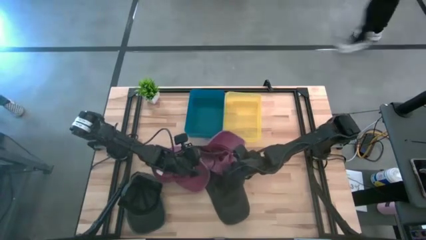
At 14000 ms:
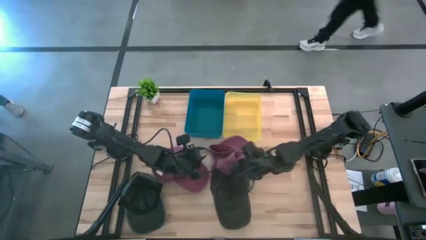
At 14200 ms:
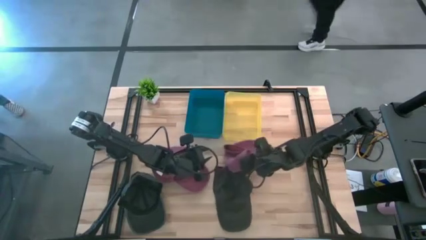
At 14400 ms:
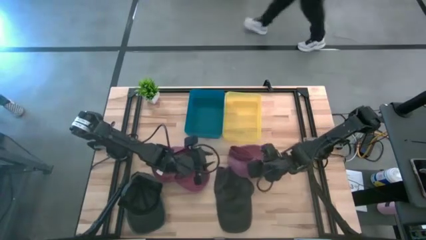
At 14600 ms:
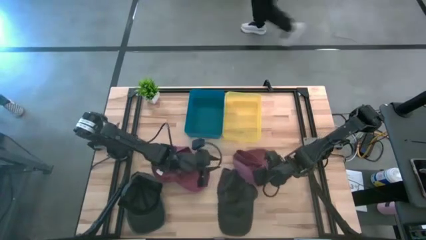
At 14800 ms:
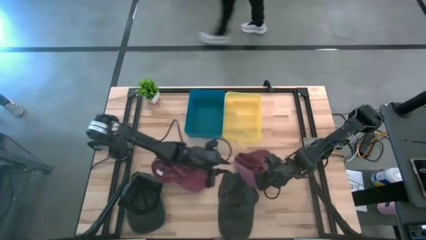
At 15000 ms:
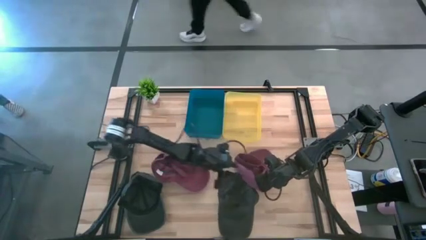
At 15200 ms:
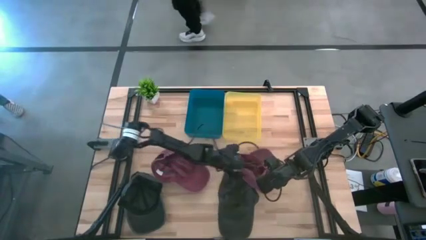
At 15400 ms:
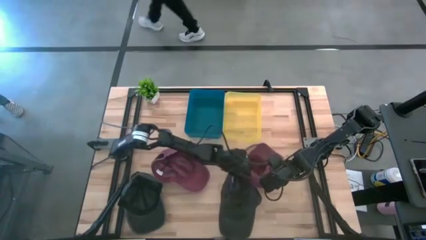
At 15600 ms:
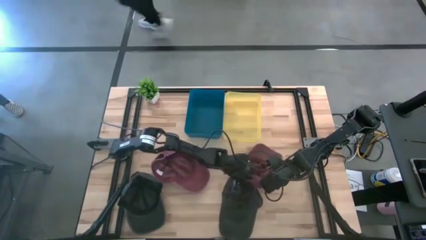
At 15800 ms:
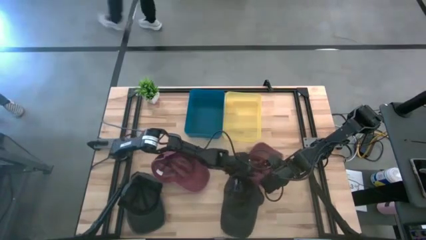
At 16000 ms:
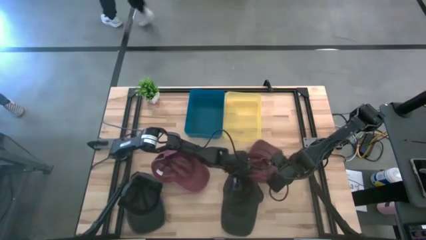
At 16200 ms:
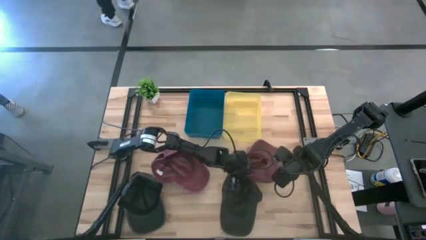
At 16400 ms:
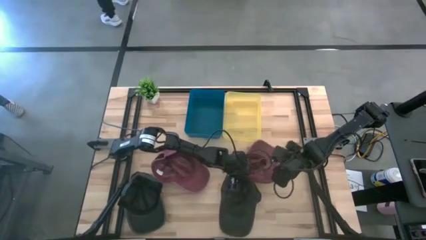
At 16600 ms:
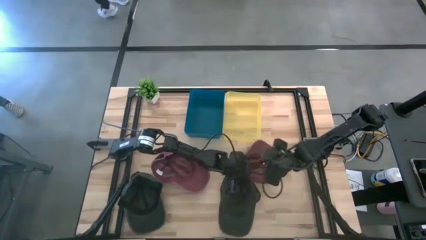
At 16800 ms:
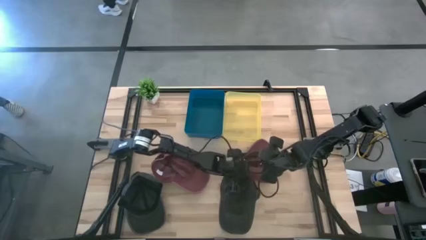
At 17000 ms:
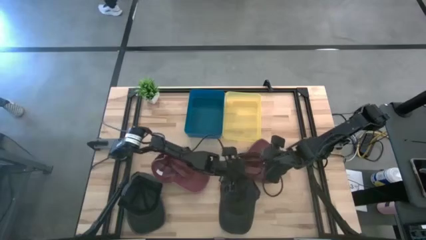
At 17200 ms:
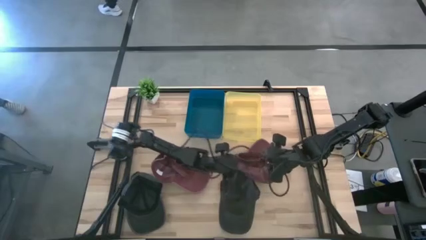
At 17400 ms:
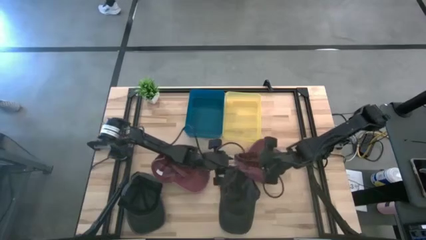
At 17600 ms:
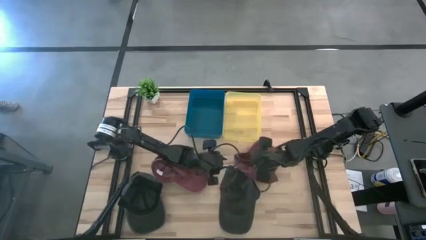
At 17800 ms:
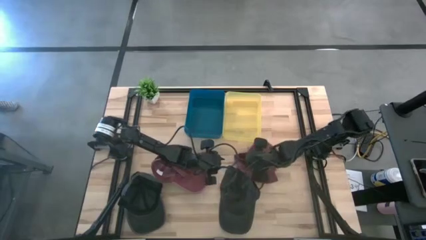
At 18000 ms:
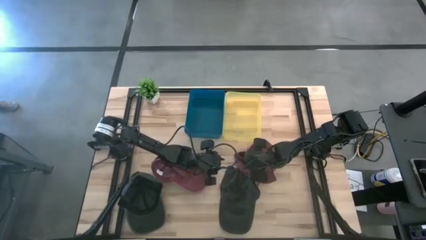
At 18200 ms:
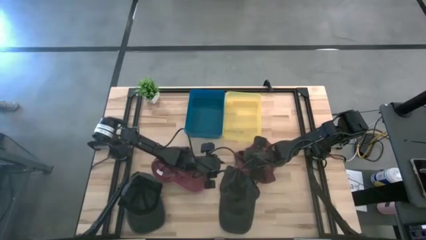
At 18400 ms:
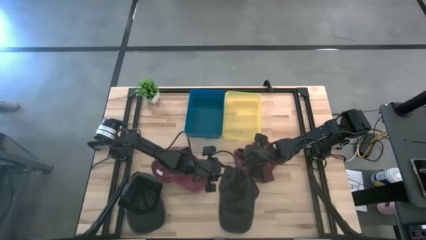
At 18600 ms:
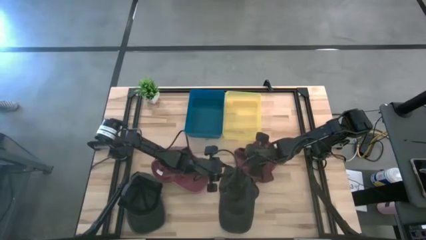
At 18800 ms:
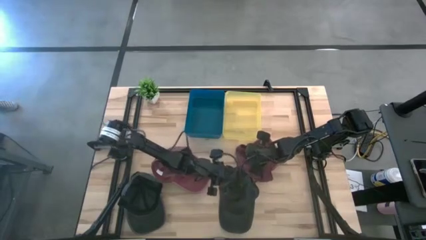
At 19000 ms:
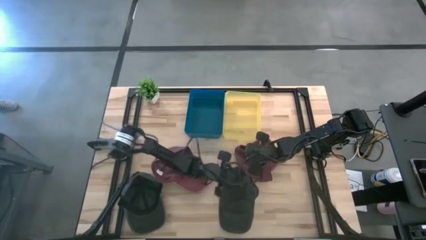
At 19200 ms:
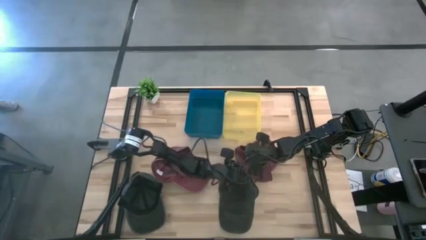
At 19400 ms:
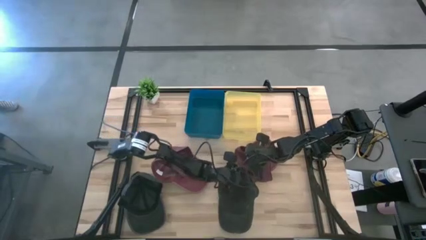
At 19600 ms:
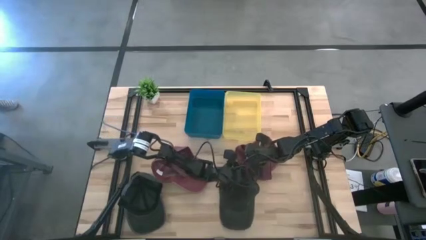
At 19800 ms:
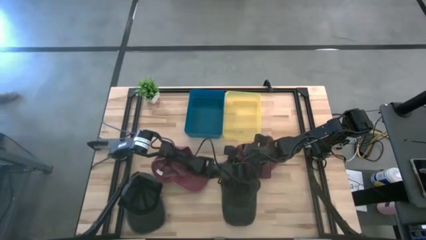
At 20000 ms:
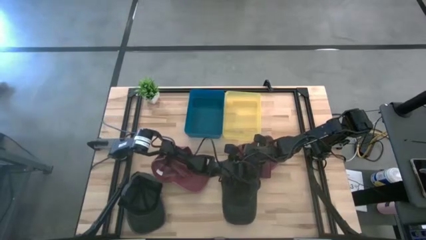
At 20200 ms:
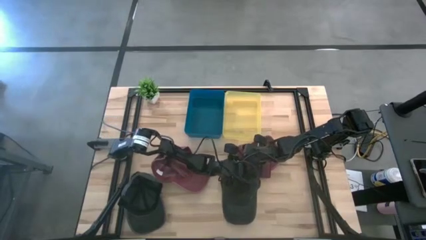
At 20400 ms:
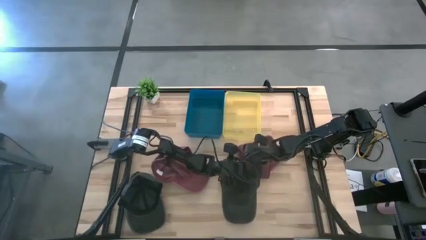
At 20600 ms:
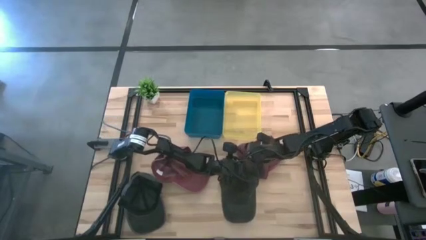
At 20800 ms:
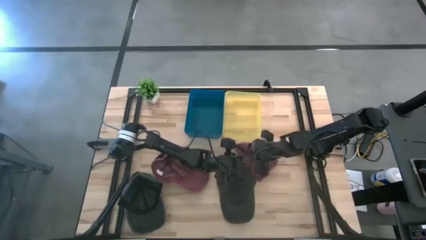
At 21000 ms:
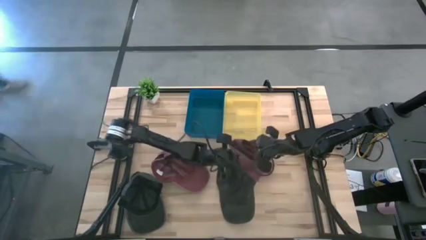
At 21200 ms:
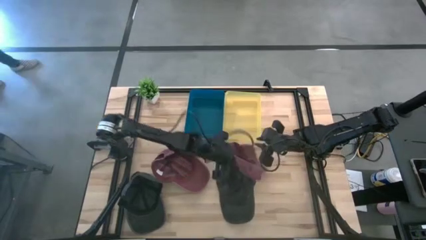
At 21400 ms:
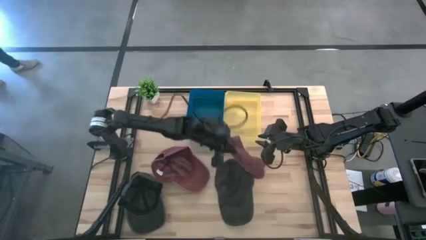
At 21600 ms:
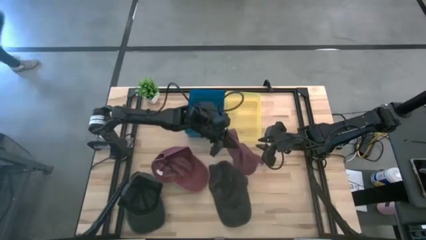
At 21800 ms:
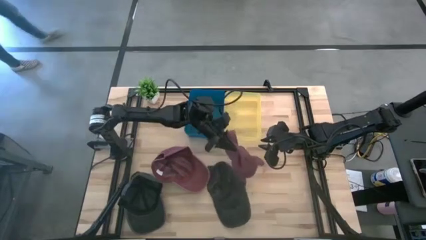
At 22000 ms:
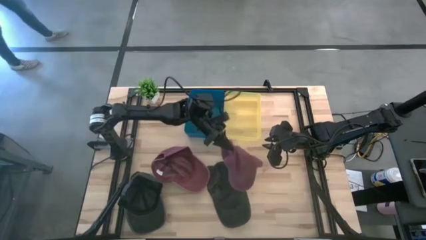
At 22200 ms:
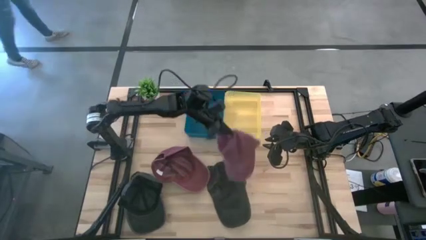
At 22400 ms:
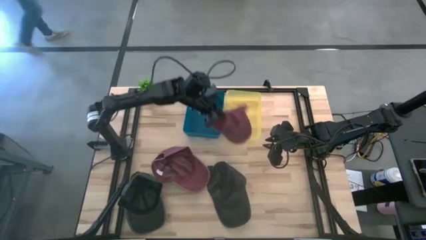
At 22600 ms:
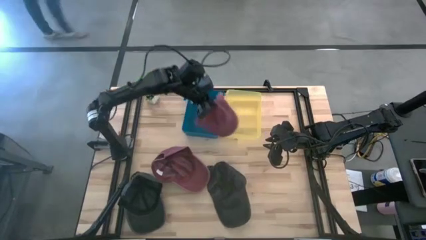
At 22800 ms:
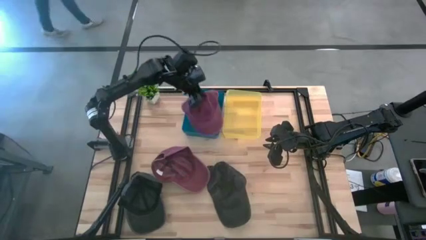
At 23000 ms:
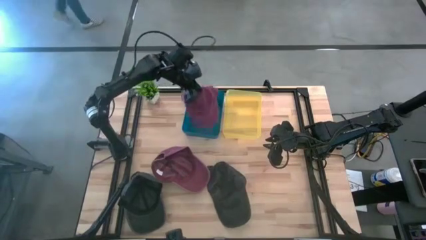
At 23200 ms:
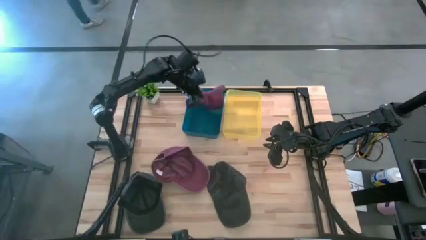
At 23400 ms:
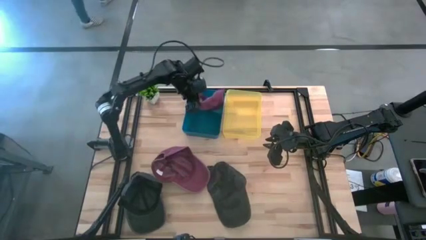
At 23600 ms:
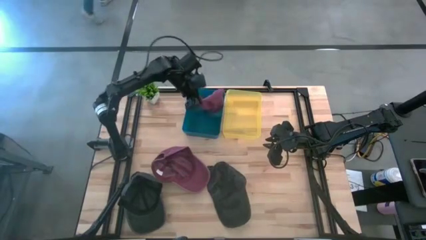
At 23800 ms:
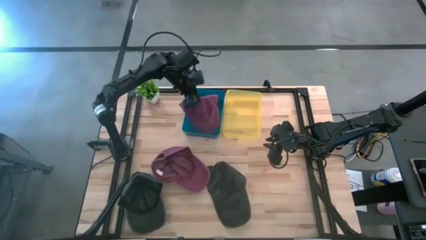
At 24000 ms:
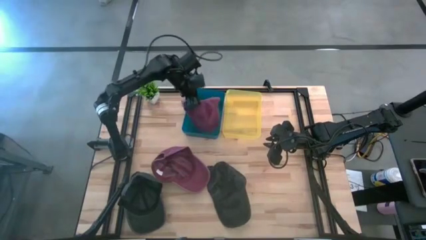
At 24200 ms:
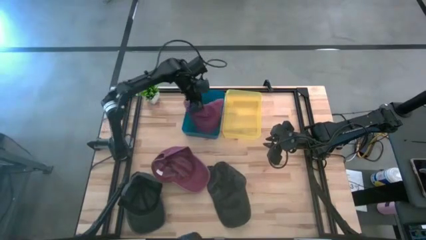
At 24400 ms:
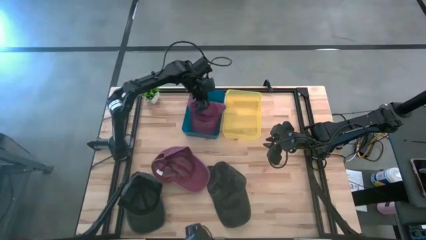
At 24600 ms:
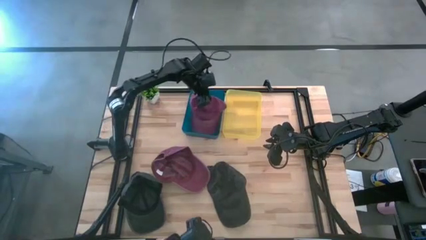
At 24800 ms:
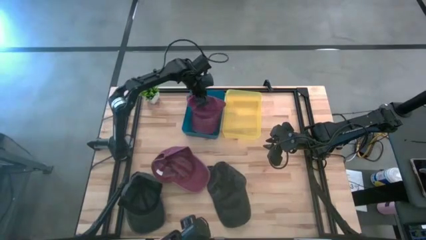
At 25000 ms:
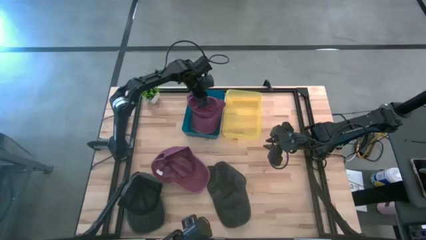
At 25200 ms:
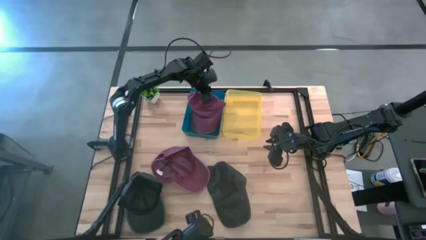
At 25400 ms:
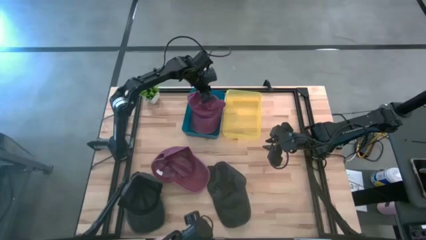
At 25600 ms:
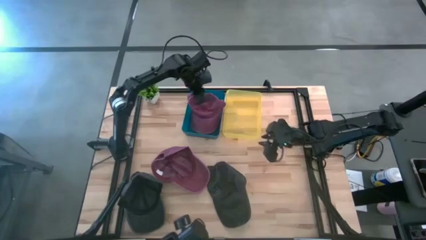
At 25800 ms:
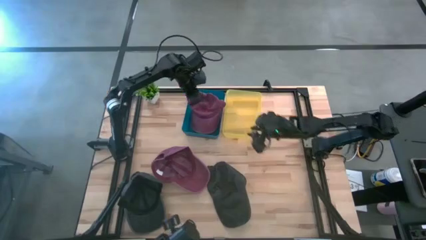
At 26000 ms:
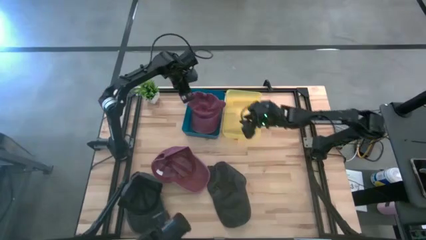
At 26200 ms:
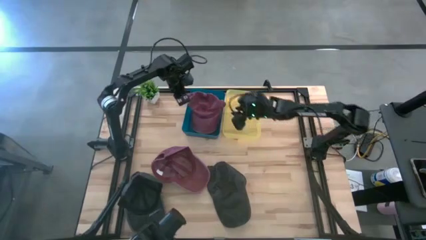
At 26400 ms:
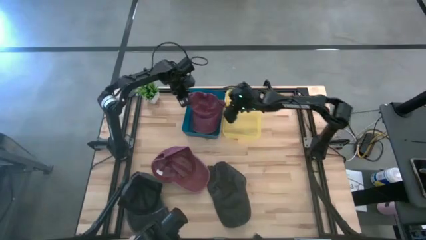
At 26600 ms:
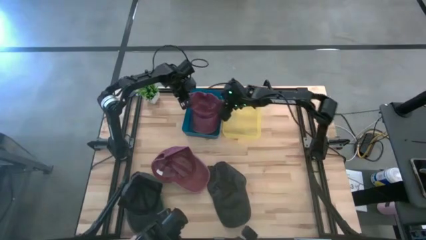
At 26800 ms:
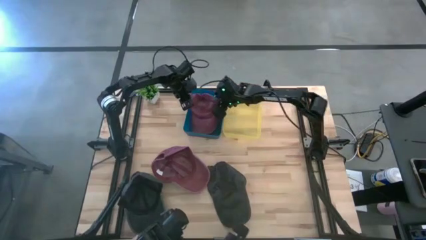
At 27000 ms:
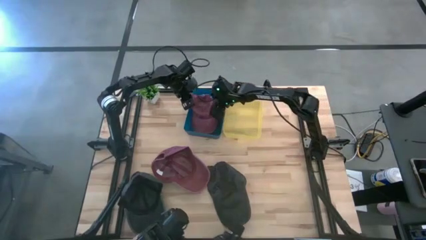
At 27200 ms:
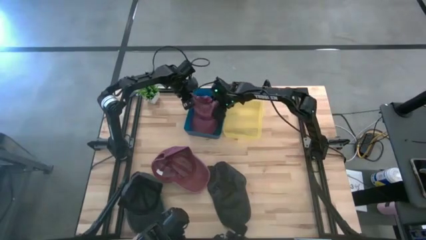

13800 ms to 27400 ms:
Task: Pick & Place hat
Put the bottom red cap into the blue bin
